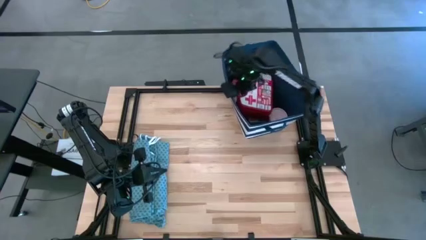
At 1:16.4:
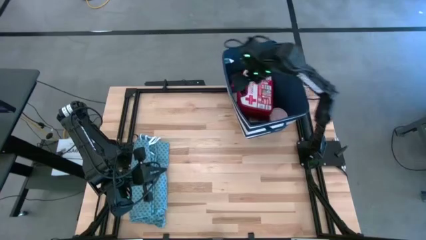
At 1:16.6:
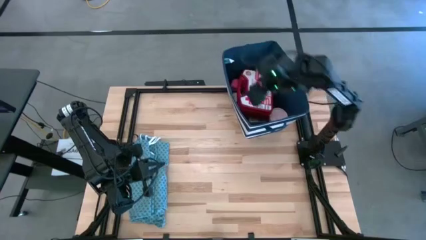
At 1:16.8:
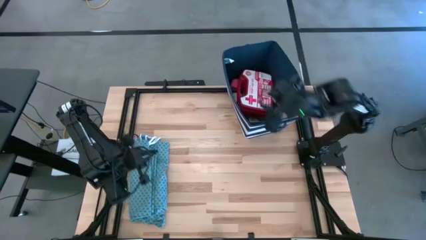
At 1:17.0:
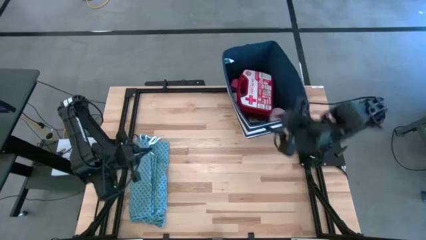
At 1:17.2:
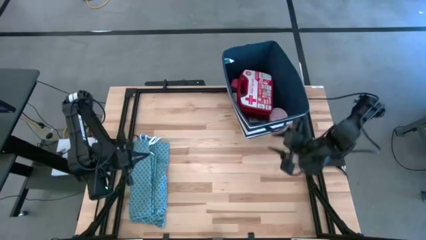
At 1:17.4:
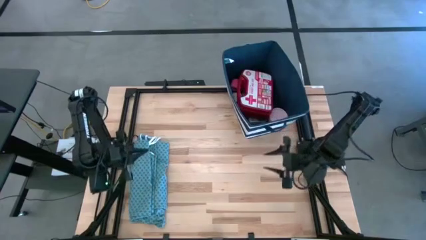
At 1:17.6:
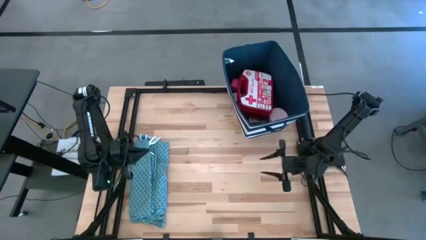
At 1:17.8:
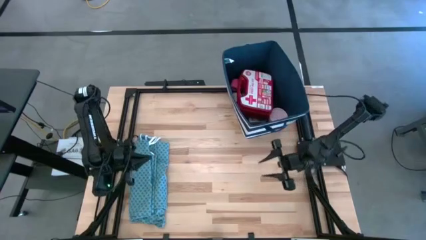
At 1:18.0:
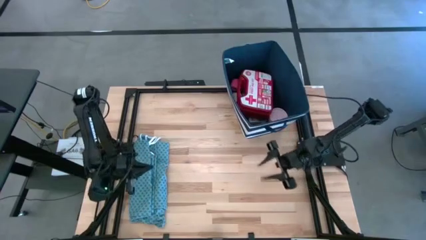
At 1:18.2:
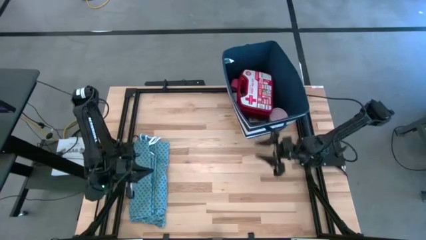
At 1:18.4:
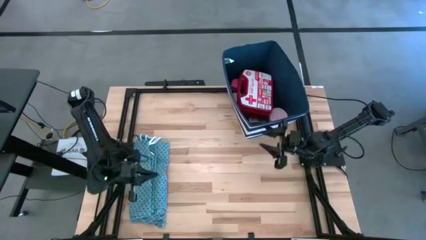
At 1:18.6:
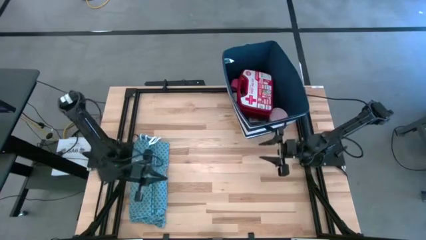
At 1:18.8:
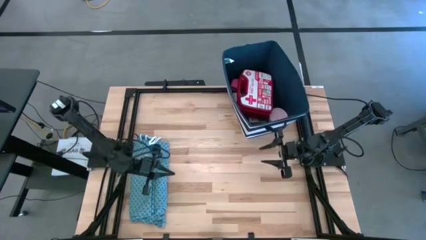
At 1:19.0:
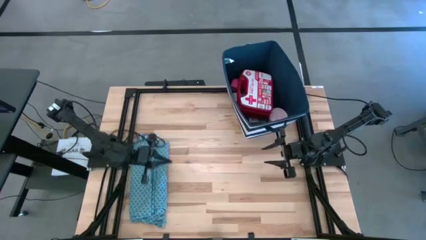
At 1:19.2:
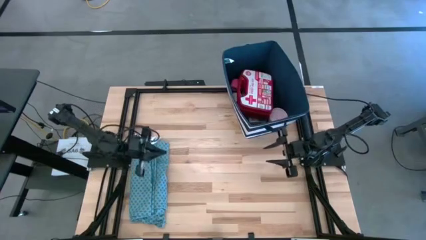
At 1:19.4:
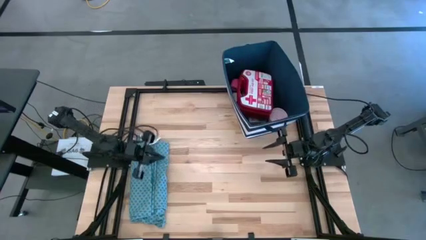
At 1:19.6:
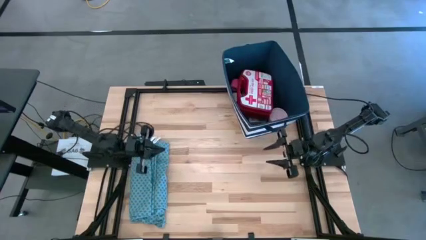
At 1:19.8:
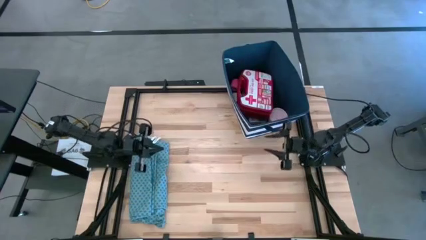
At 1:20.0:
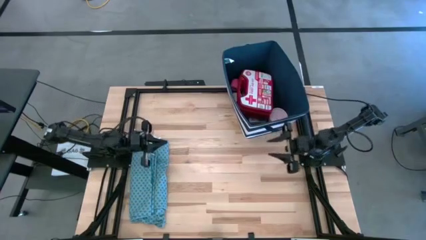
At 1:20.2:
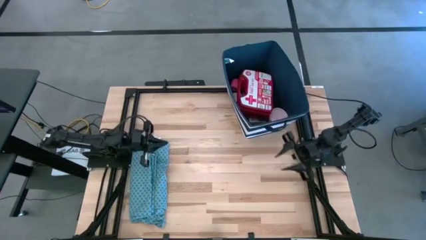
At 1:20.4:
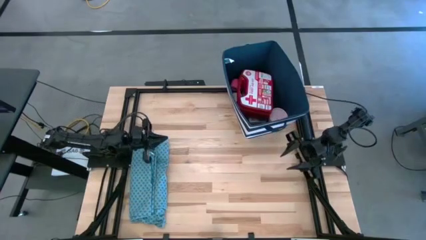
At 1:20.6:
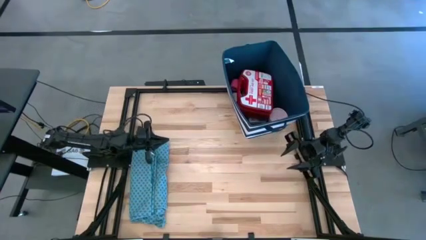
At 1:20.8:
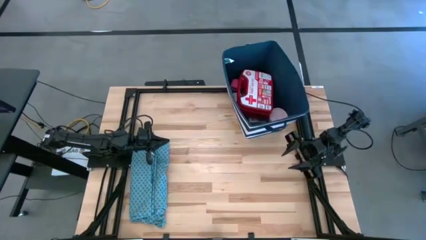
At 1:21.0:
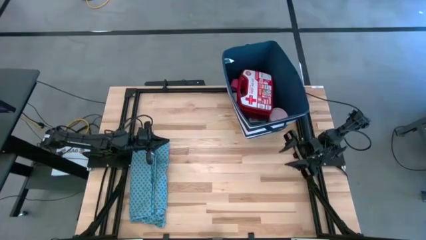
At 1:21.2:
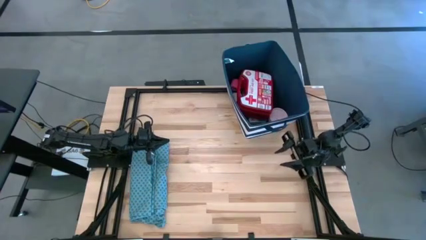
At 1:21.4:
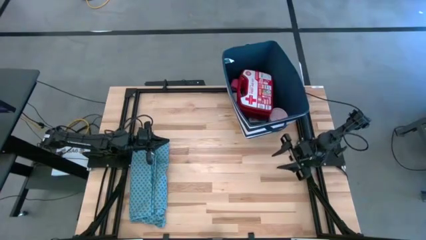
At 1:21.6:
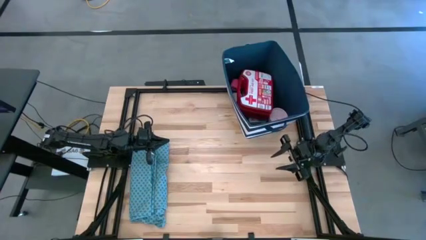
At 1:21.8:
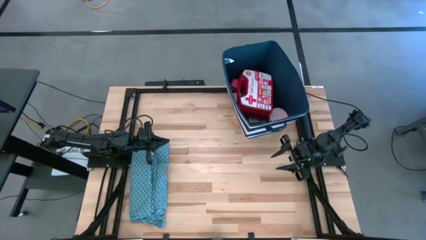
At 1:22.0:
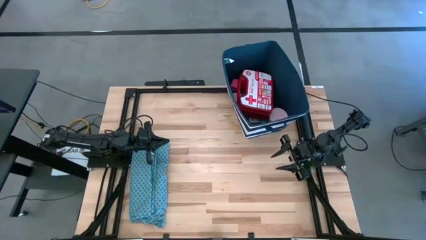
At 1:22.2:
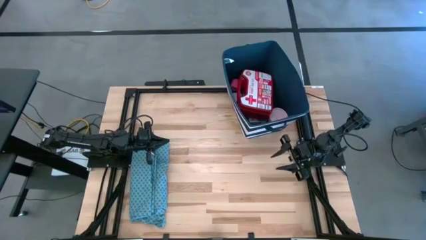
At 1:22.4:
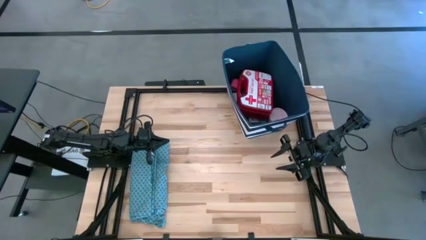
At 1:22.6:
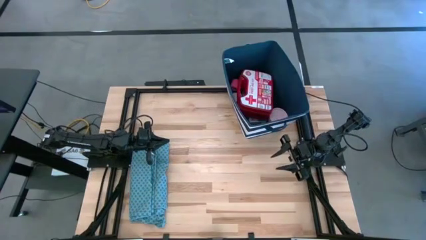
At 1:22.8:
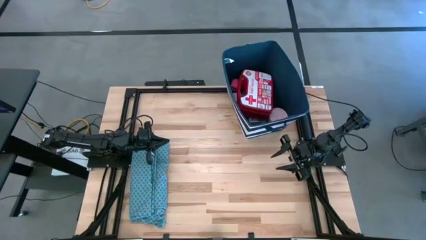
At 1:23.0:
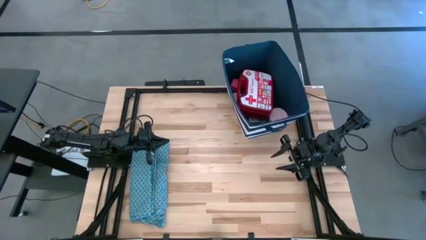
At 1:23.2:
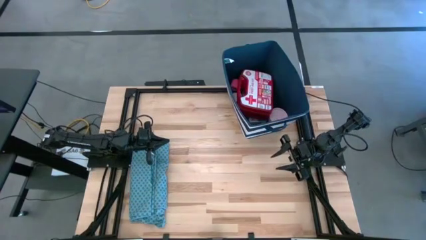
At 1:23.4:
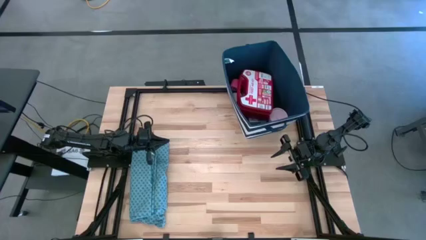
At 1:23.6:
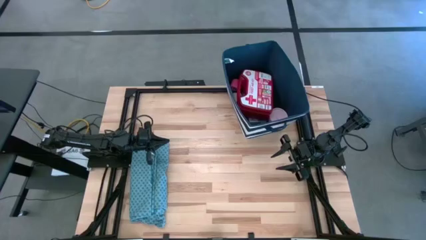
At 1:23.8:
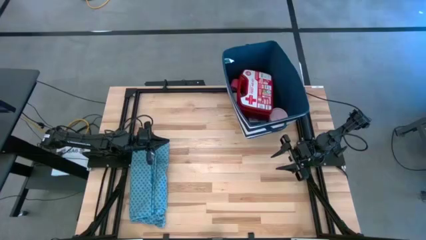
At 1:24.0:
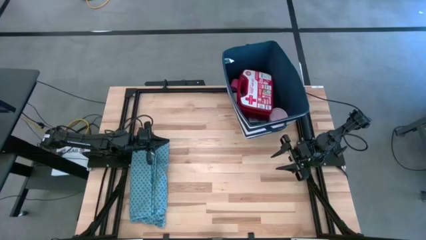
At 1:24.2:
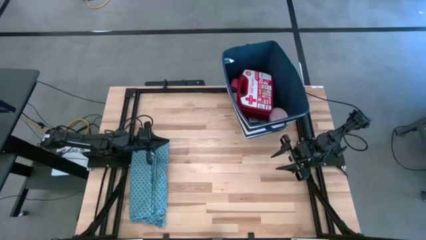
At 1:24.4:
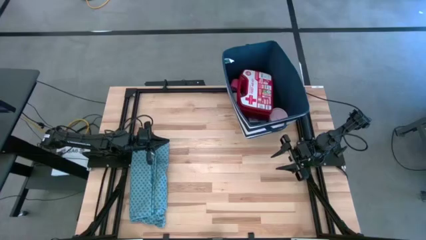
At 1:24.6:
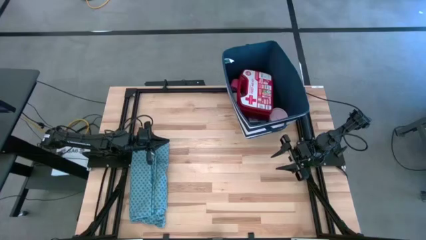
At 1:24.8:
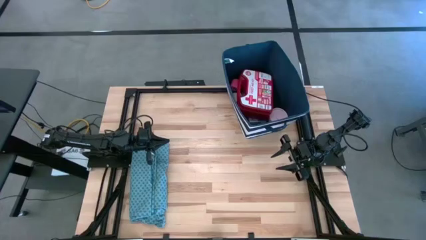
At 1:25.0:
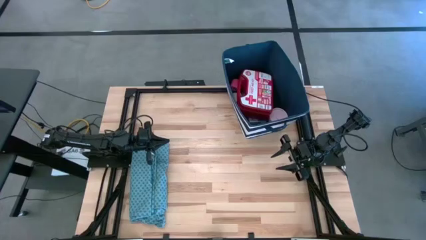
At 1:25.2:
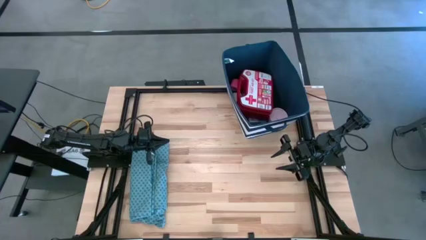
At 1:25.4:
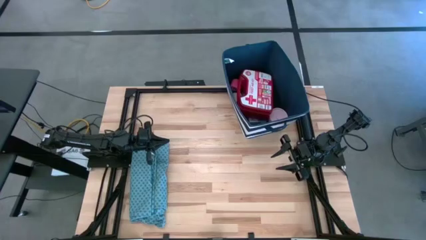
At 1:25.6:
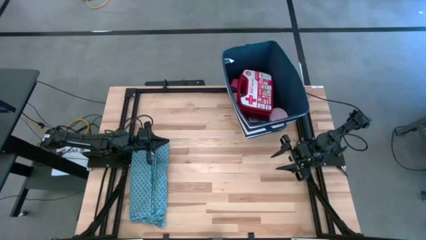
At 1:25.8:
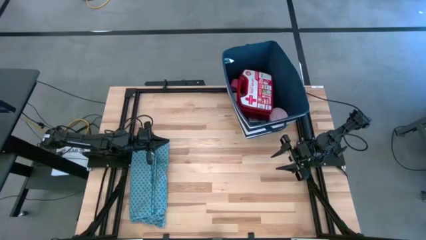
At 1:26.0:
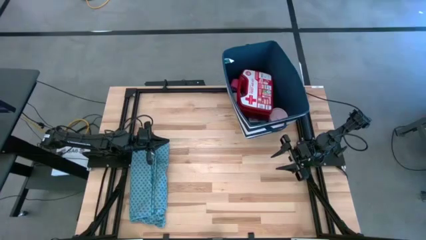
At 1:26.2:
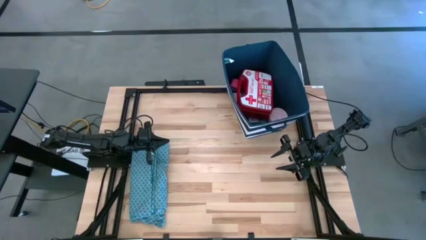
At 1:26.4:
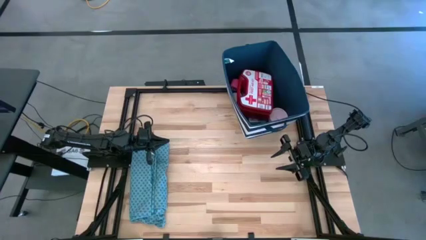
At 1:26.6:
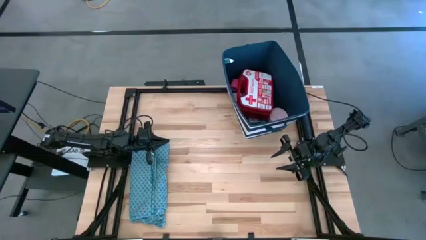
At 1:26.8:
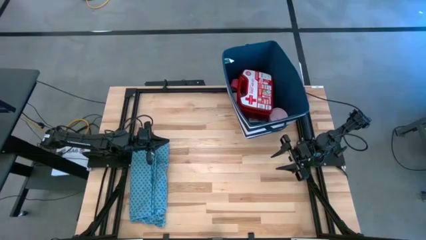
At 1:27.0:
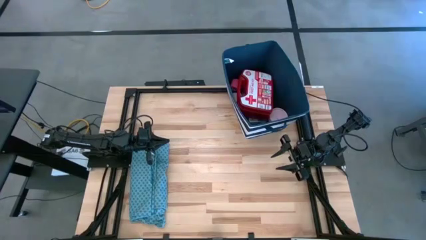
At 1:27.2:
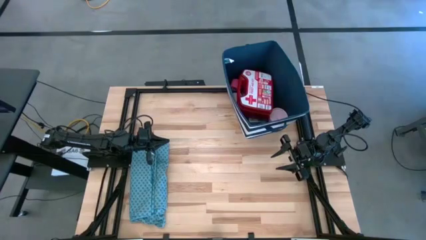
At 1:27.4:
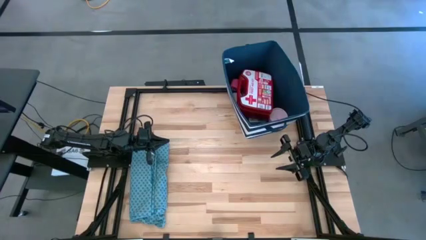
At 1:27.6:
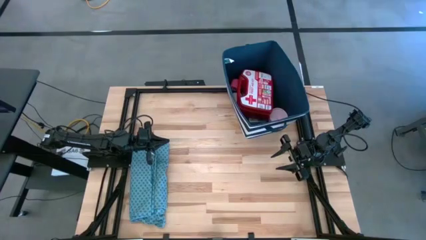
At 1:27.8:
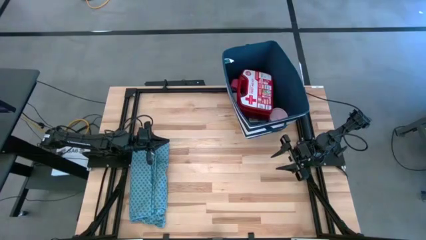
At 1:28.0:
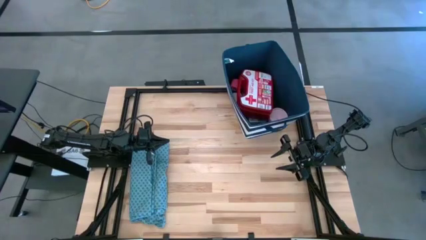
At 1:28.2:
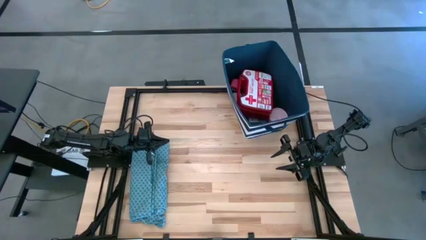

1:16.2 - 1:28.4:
Task: Pick & place medical supplies in basket/bin
Return to Home Position
